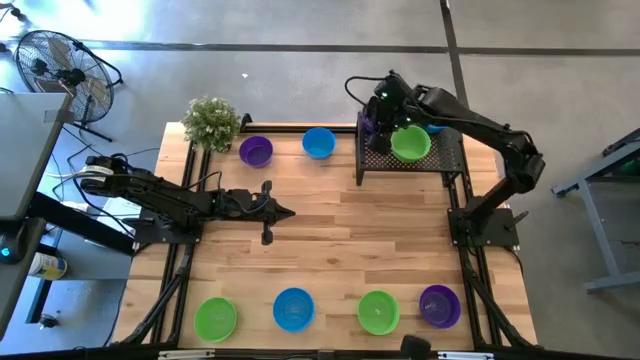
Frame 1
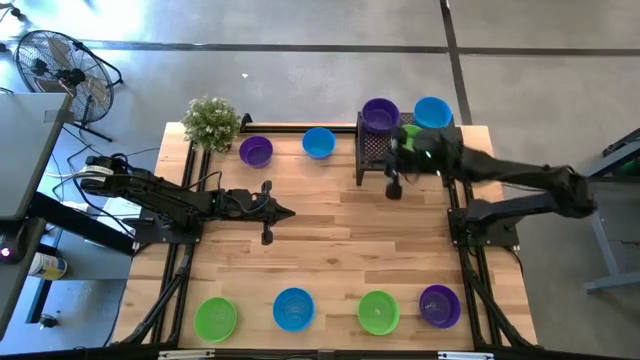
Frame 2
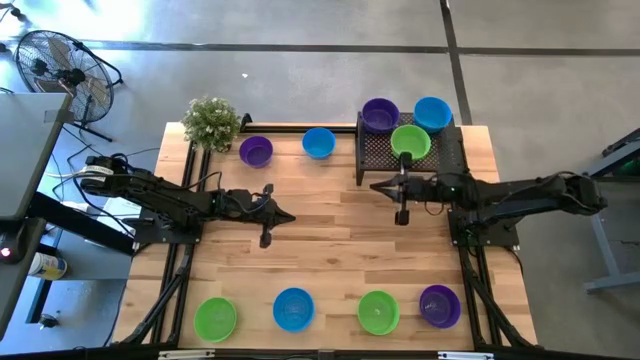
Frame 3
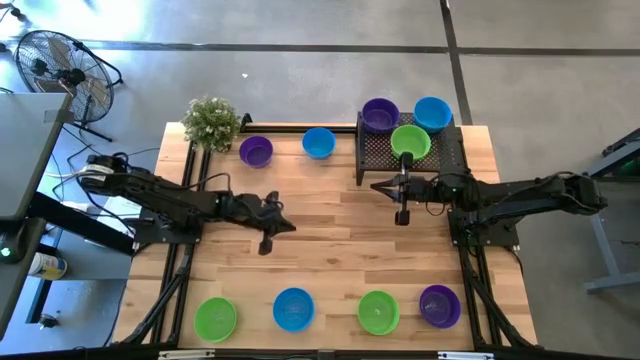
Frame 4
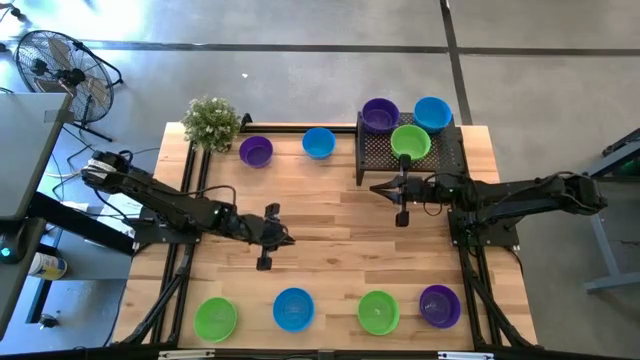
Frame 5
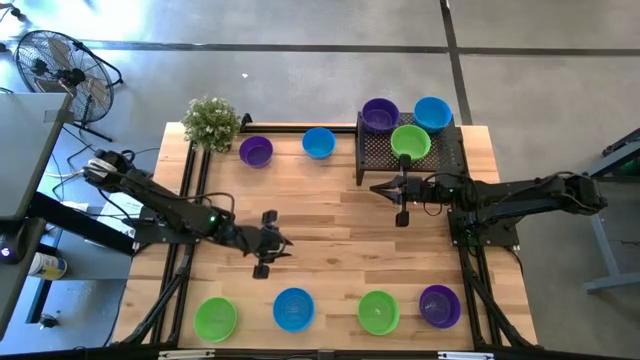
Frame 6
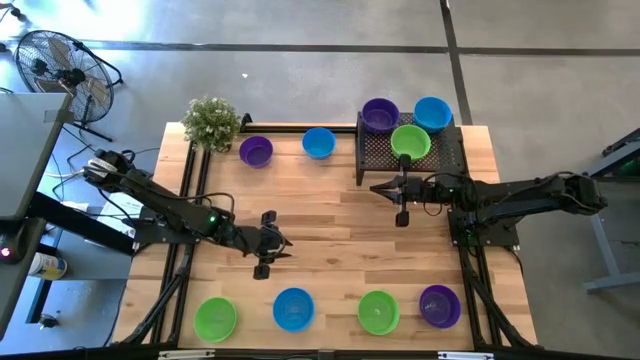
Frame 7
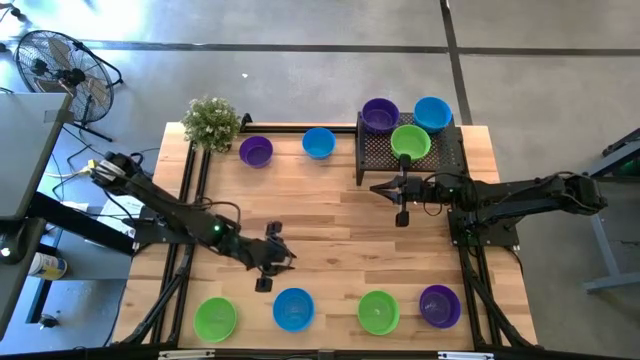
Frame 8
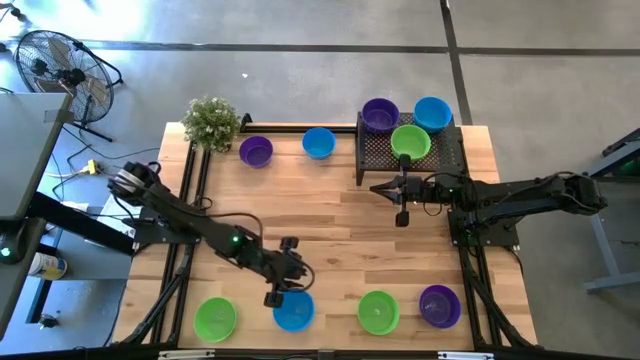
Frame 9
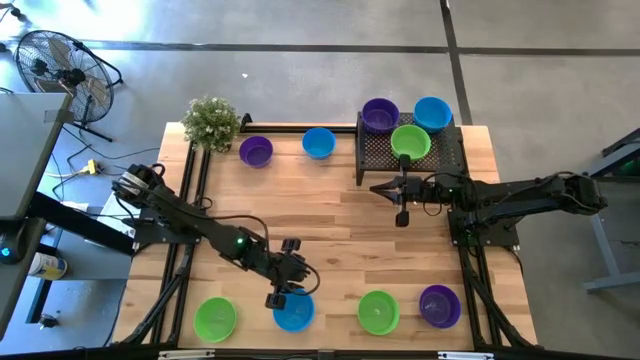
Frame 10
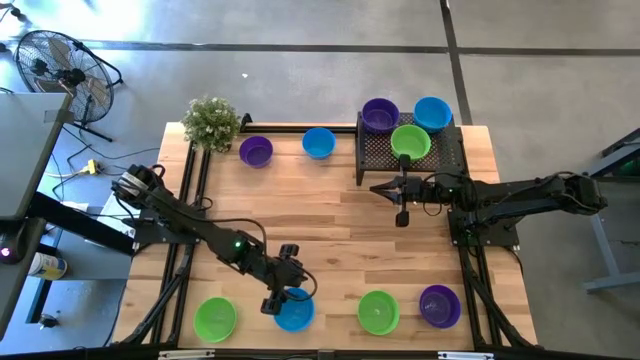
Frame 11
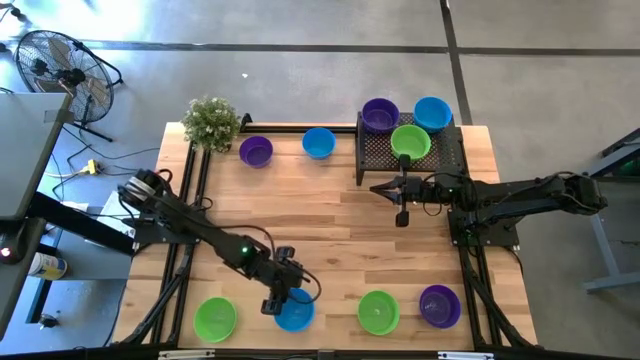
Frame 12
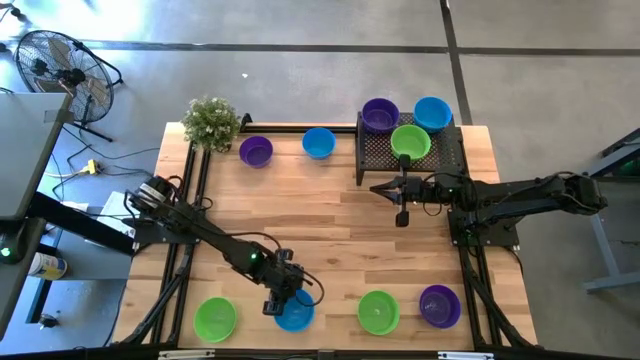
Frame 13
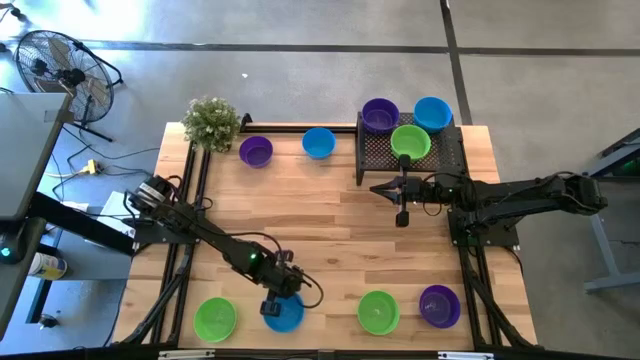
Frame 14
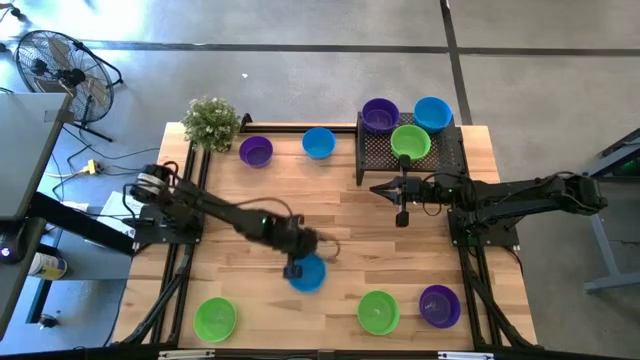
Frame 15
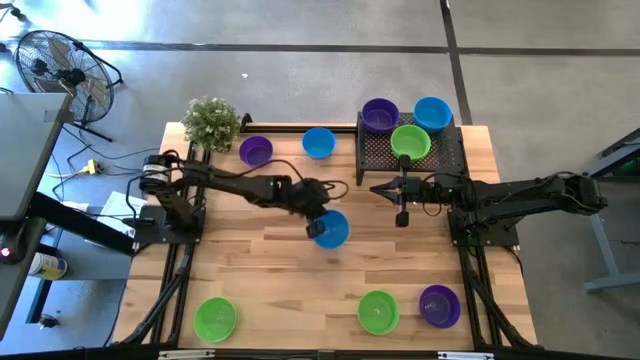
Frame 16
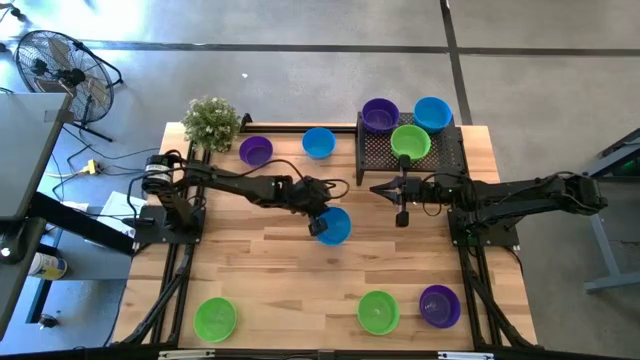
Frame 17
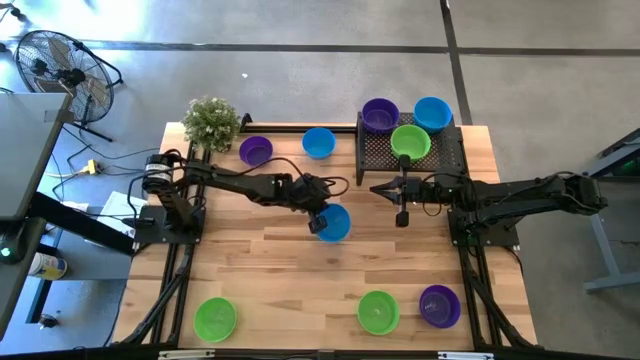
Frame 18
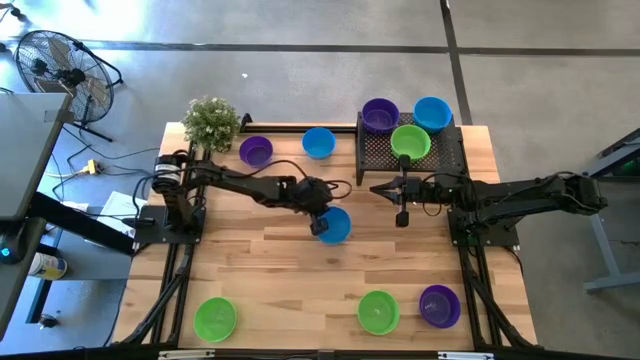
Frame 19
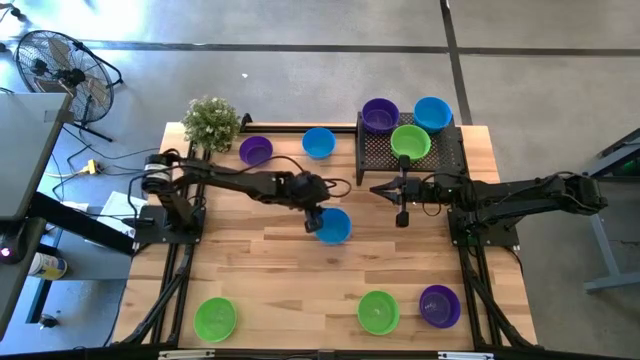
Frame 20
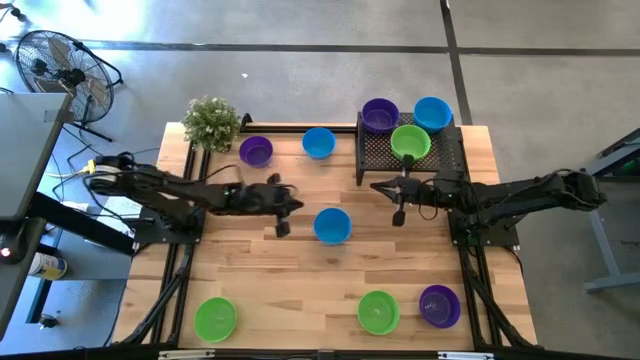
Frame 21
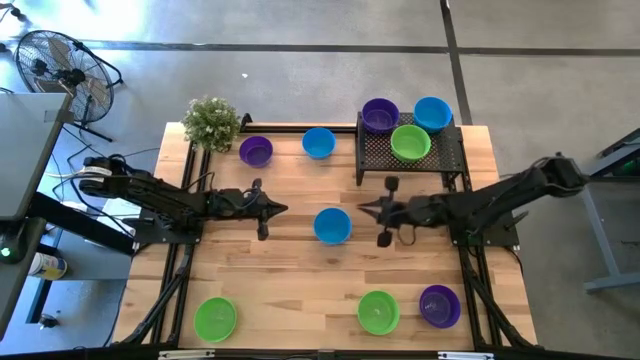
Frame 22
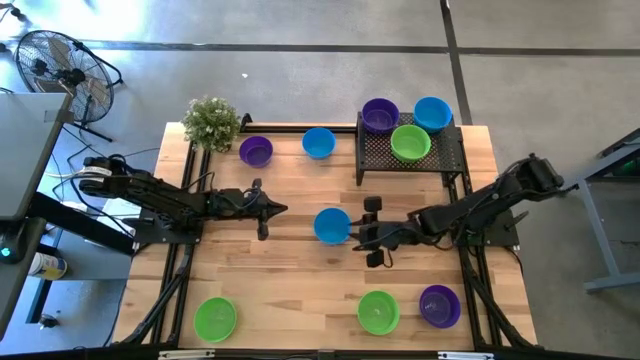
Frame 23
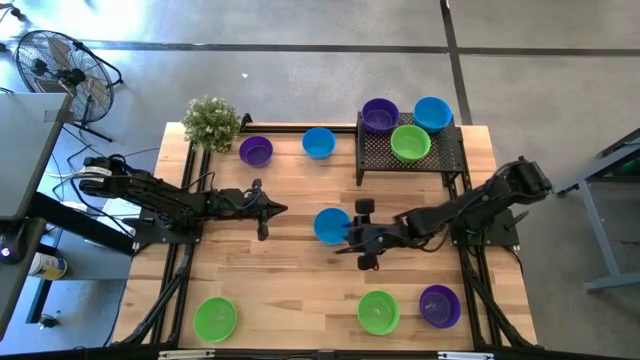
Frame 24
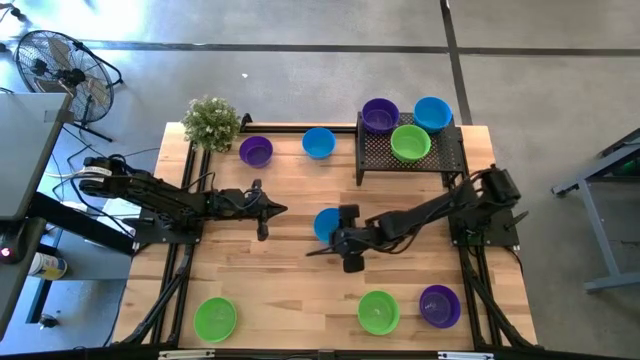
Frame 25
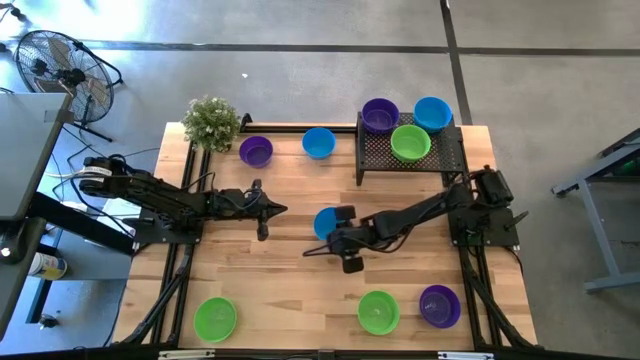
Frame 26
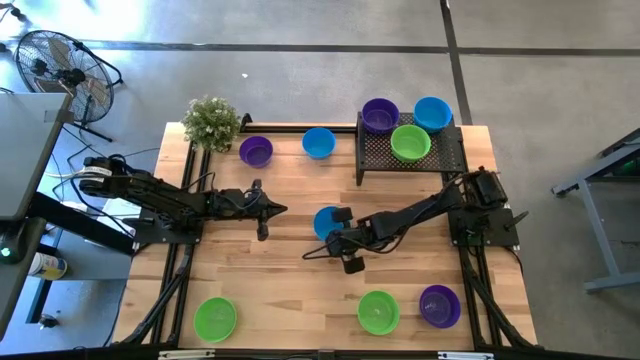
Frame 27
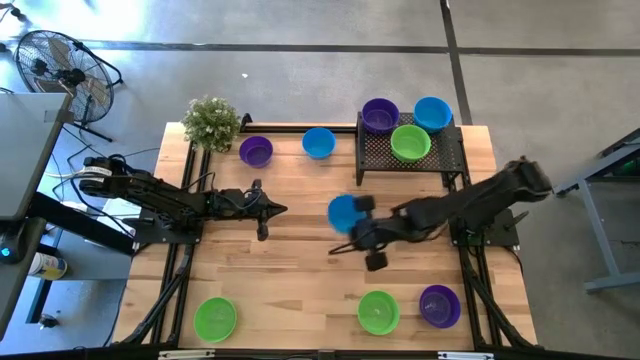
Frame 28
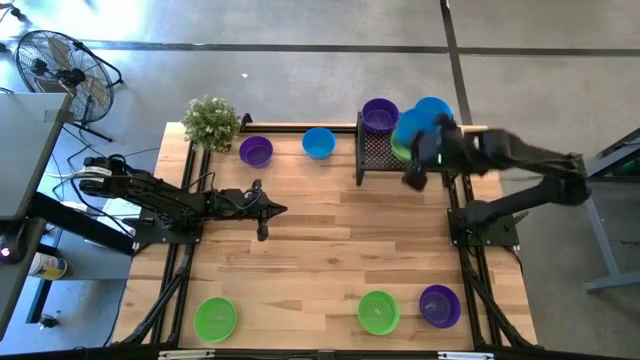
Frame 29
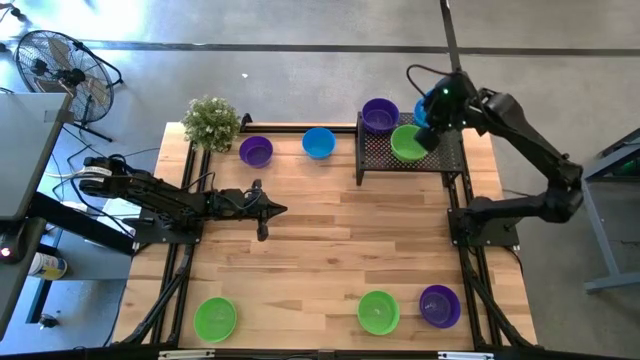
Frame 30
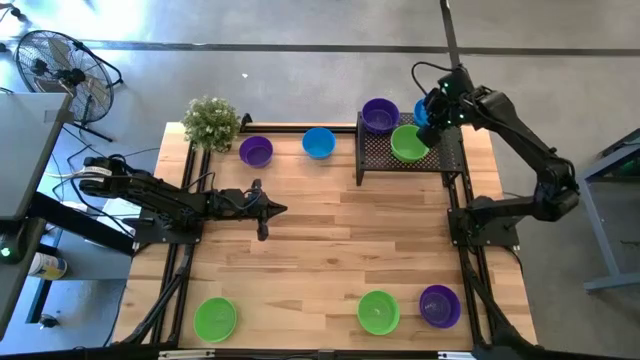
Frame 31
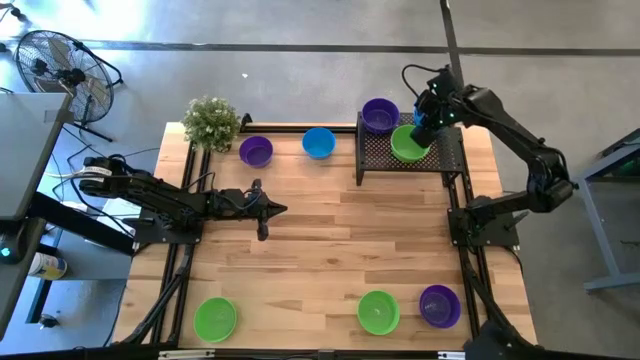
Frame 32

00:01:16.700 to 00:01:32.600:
Task: Pick & Place Mini bowls
Stack the blue bowl on the other blue bowls on the shelf

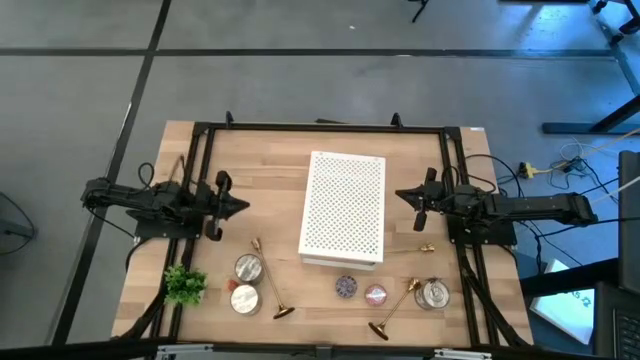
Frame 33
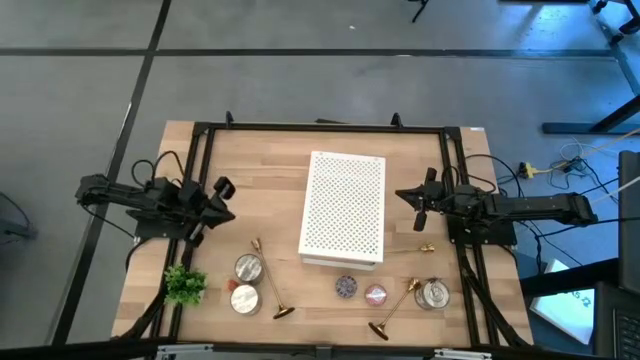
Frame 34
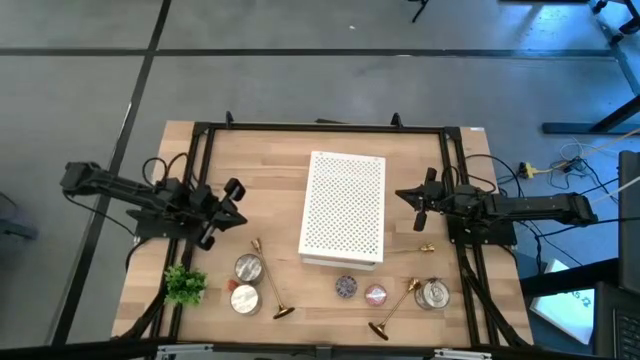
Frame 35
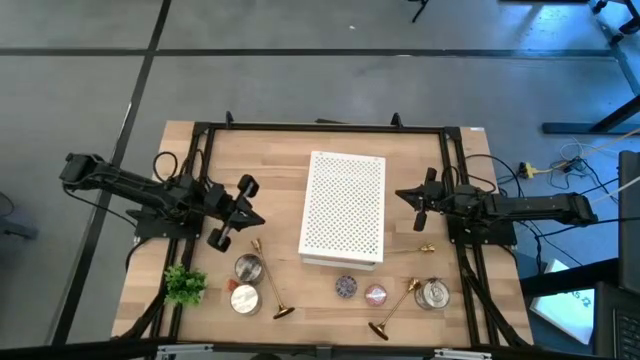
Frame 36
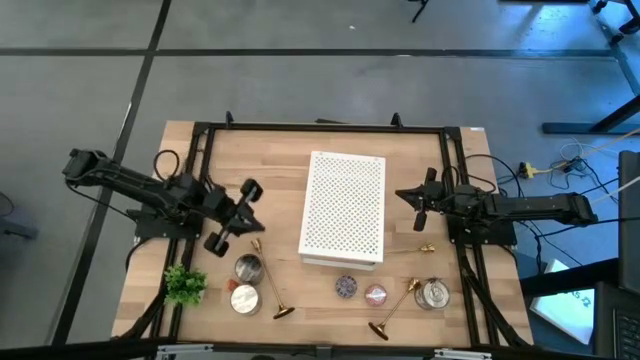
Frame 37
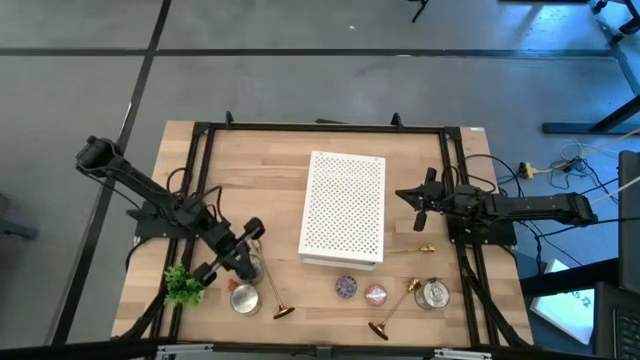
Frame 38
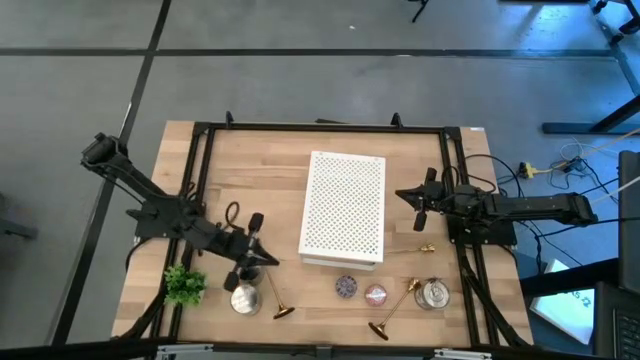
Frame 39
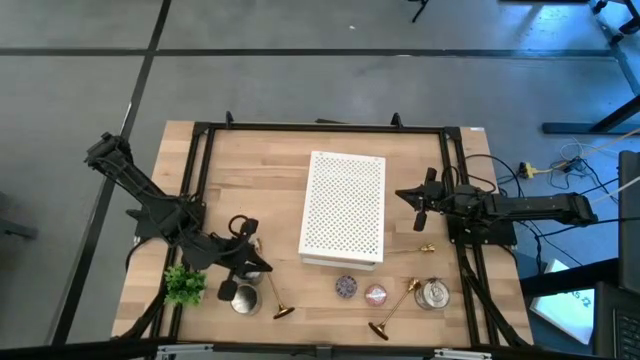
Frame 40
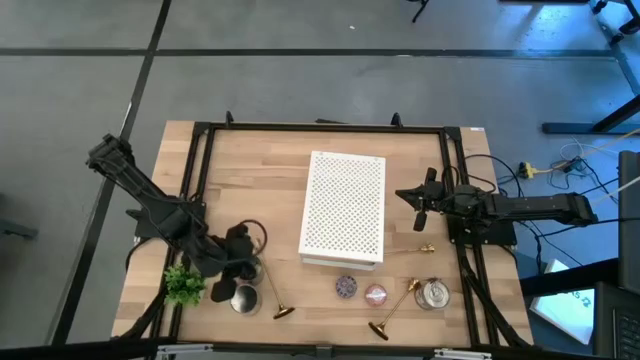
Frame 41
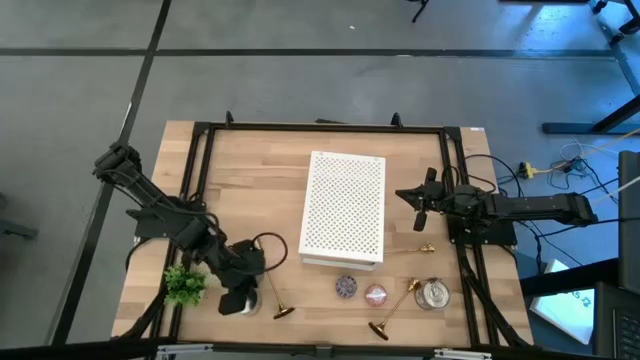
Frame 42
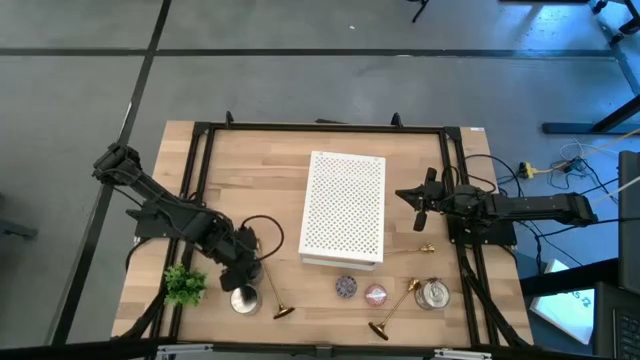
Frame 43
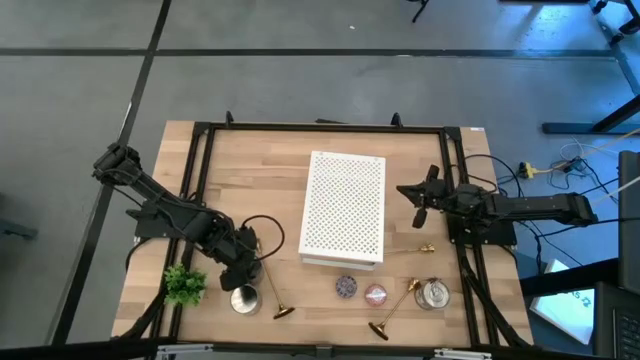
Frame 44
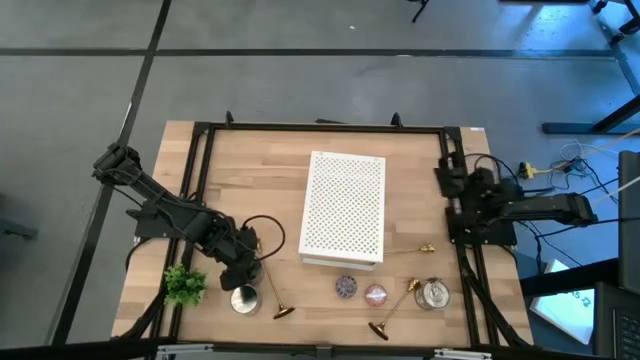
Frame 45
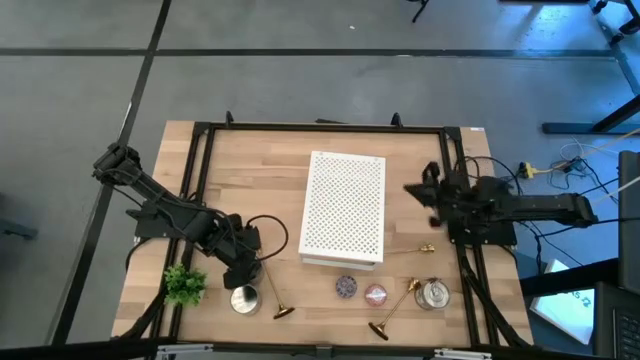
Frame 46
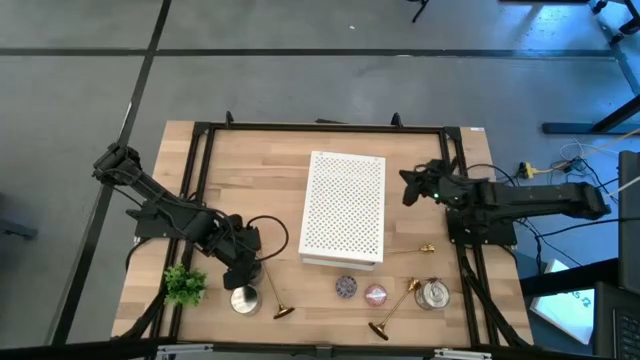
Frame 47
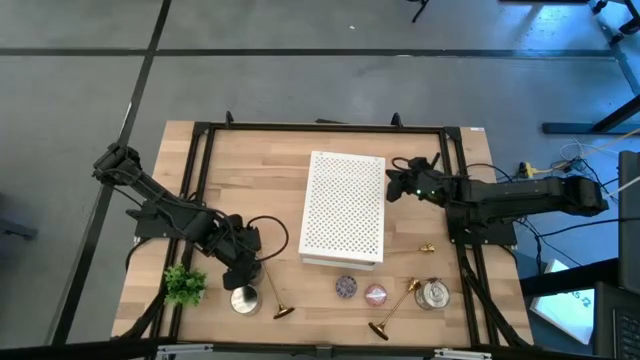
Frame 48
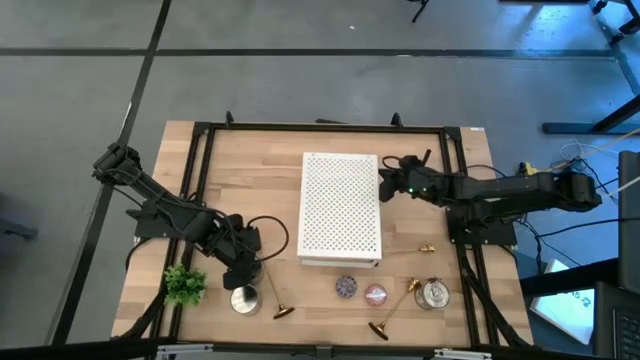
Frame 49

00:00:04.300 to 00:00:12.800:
Task: Pick & Place candle stick holders
Adjust the shelf on the table
